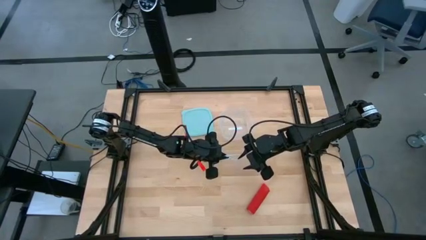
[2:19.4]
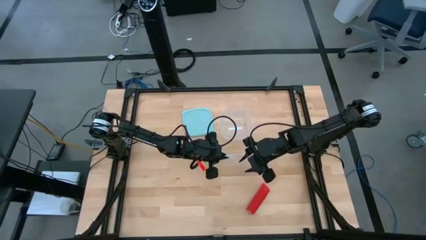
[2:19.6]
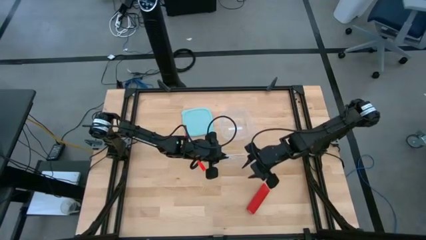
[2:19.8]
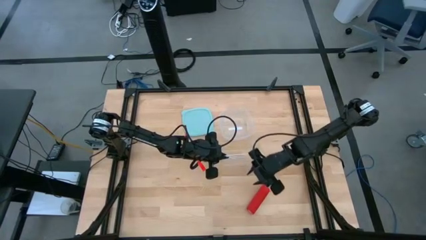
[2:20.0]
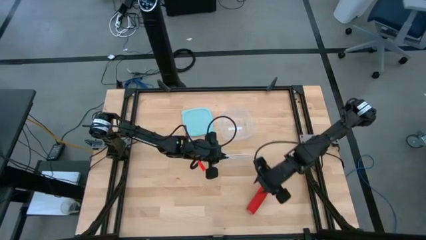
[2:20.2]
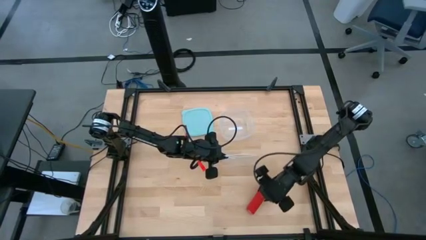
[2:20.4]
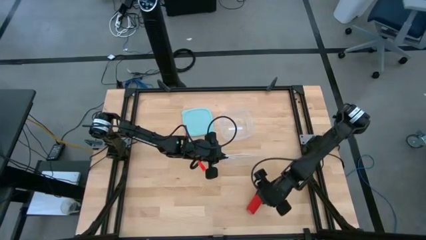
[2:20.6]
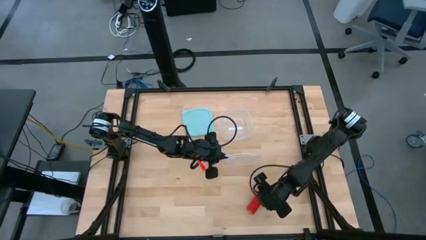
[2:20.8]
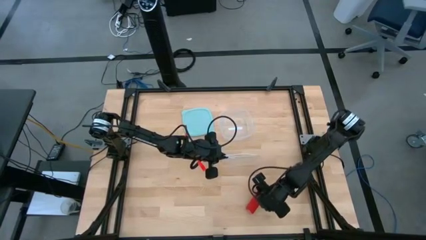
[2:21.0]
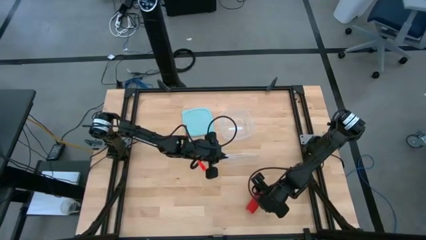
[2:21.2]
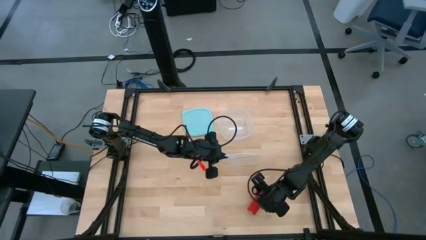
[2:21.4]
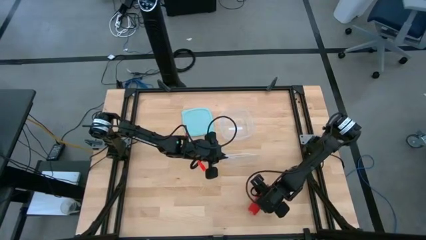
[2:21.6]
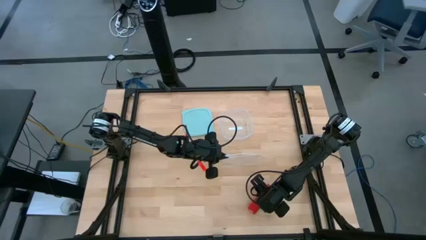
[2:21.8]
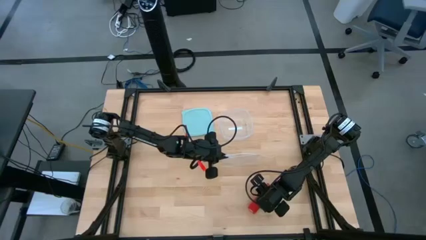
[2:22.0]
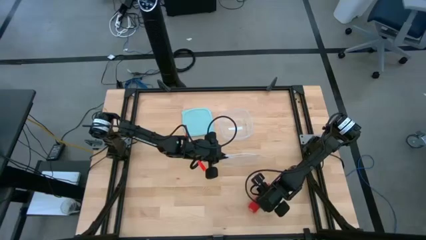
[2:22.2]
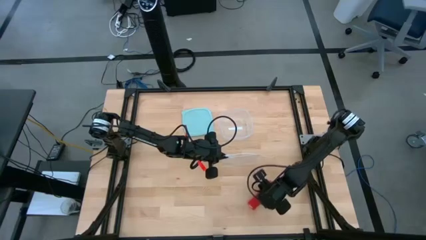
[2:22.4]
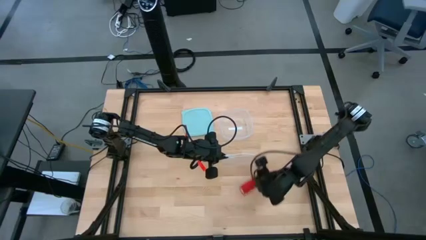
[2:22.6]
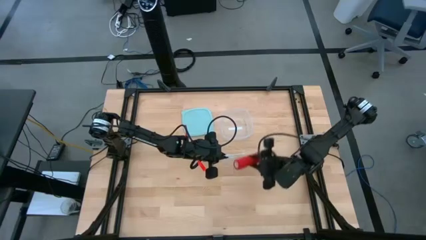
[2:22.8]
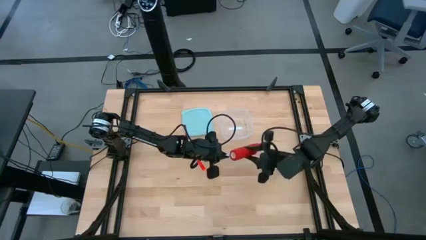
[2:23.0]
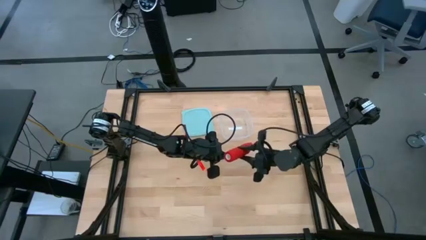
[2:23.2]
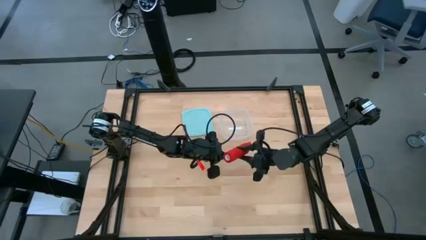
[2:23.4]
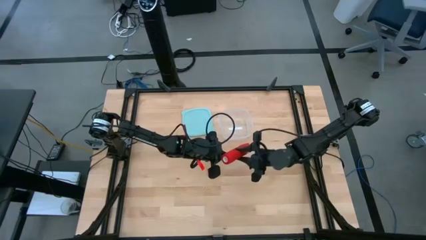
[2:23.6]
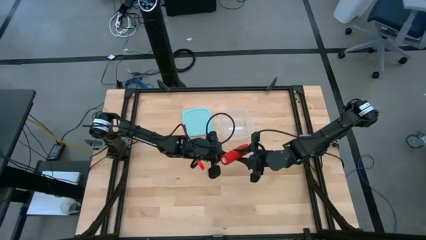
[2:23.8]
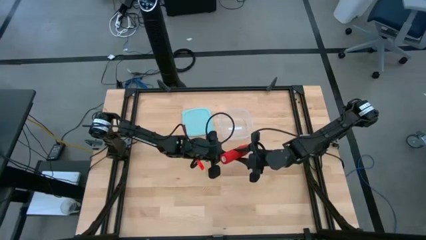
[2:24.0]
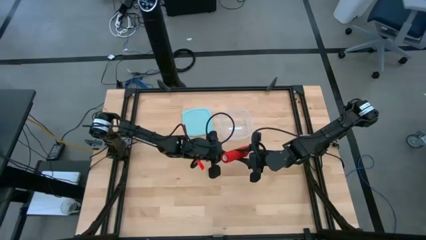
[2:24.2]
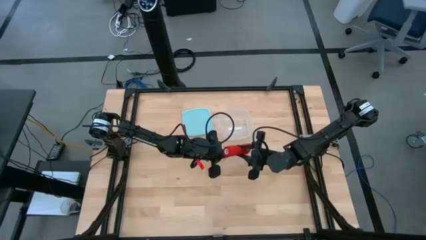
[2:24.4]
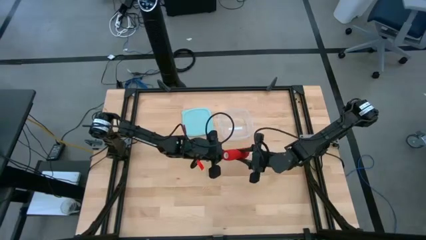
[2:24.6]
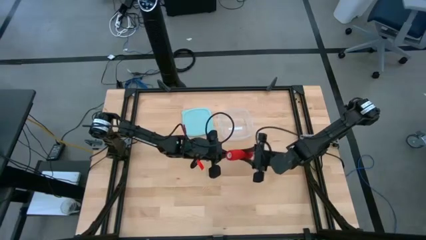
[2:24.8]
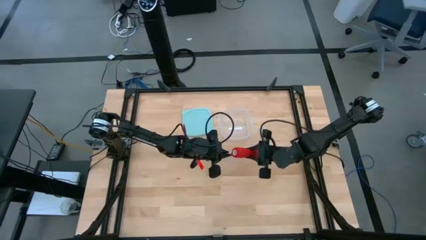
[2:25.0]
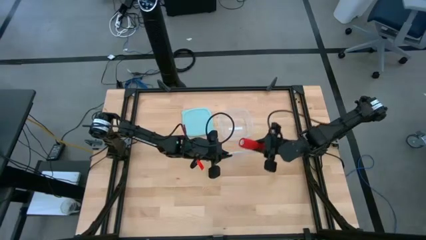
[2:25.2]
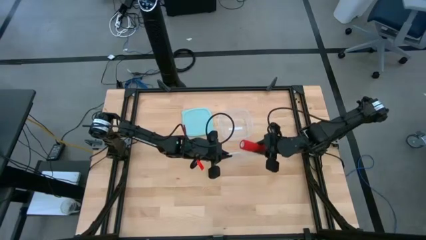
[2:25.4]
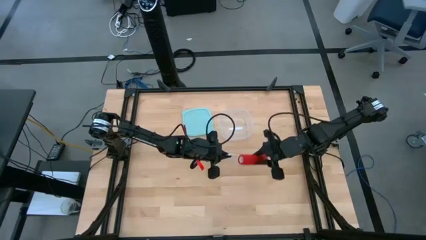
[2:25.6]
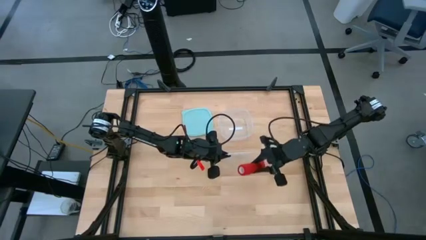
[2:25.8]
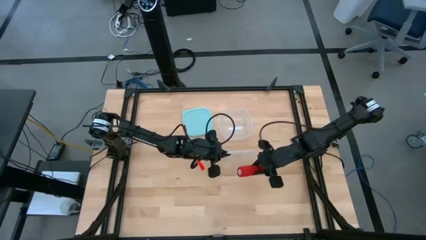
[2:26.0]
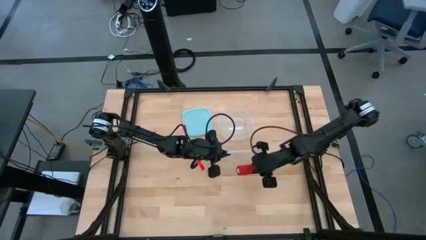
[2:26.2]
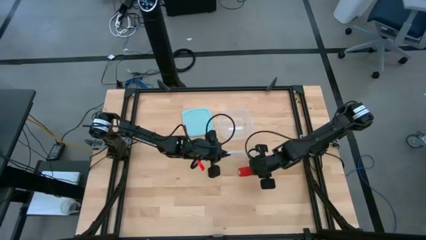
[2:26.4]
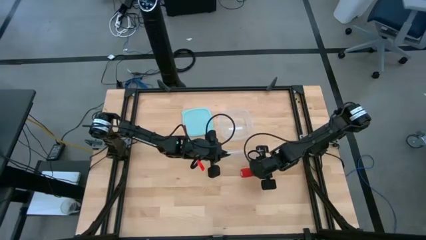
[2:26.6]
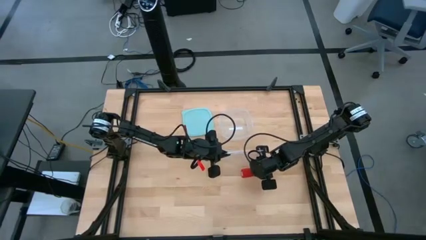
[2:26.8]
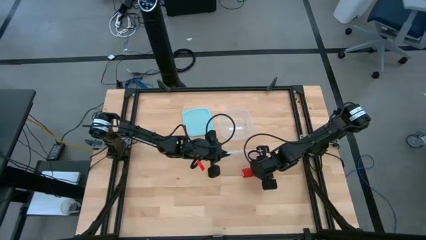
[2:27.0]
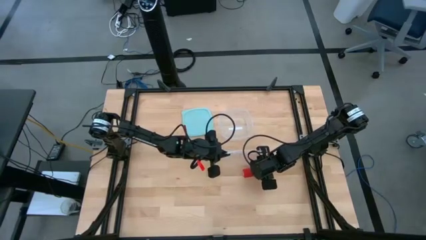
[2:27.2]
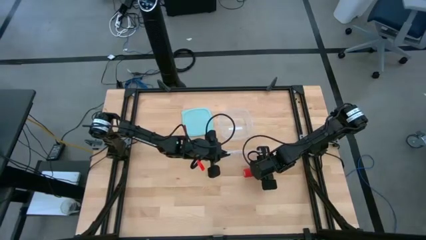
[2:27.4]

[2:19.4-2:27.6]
Task: Roll bandage
Put the red rolled bandage into the transparent zip lock bag

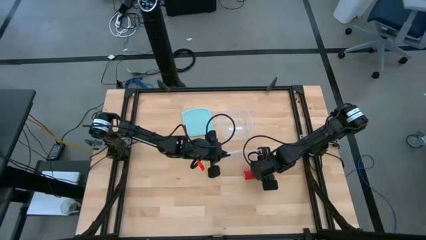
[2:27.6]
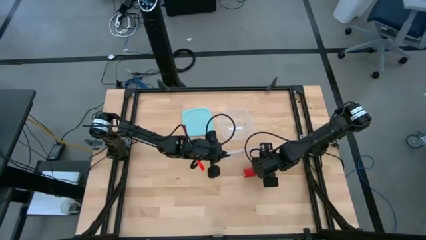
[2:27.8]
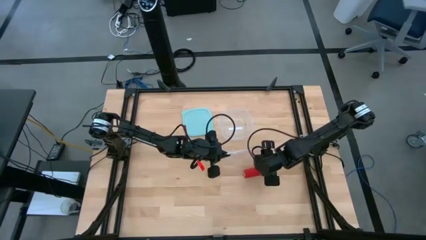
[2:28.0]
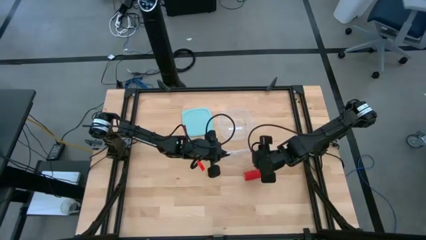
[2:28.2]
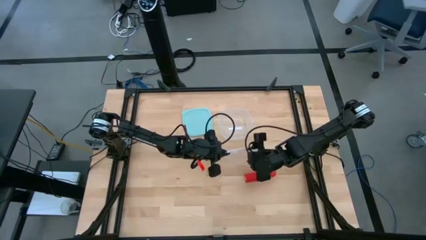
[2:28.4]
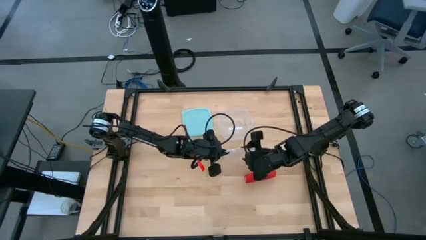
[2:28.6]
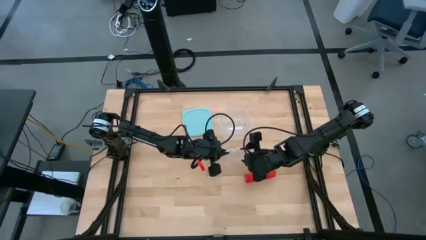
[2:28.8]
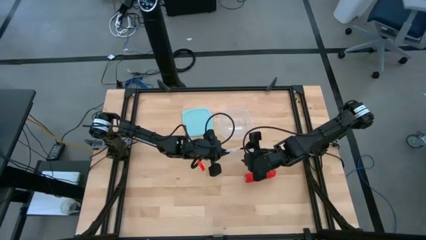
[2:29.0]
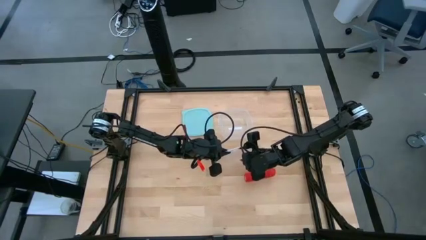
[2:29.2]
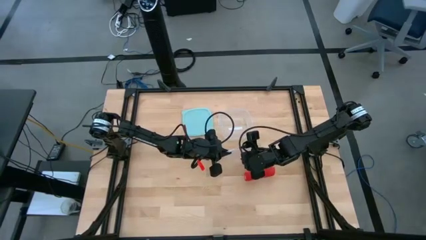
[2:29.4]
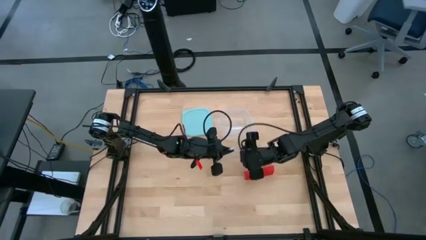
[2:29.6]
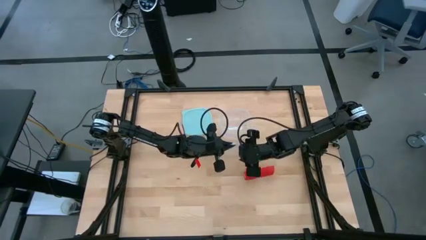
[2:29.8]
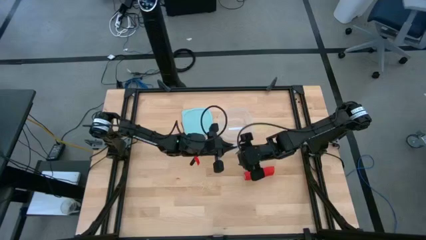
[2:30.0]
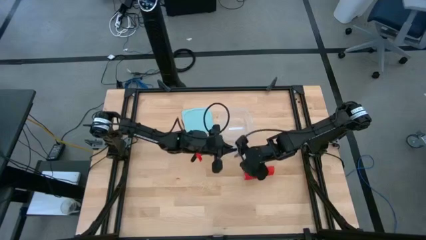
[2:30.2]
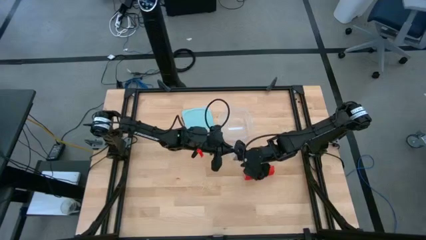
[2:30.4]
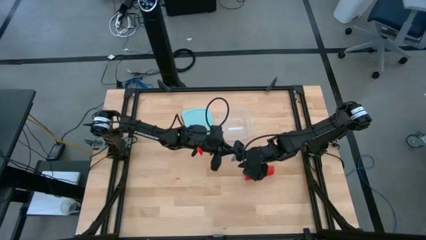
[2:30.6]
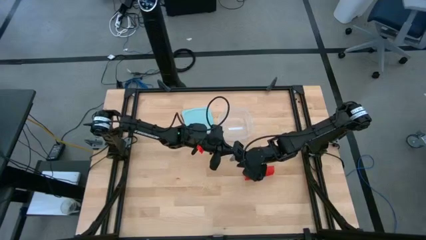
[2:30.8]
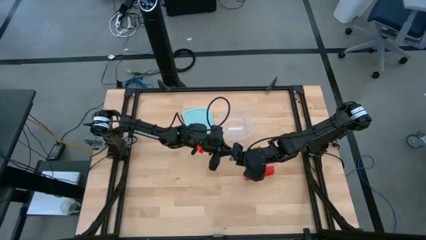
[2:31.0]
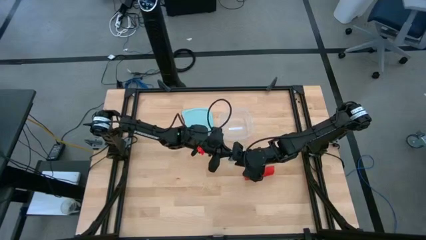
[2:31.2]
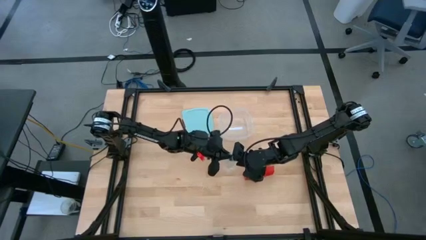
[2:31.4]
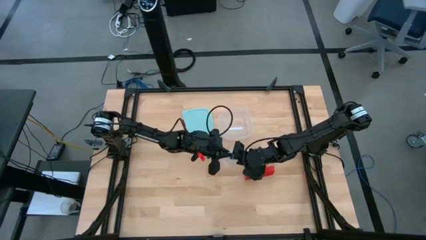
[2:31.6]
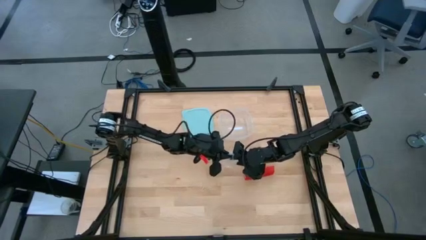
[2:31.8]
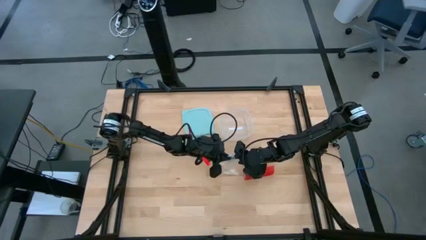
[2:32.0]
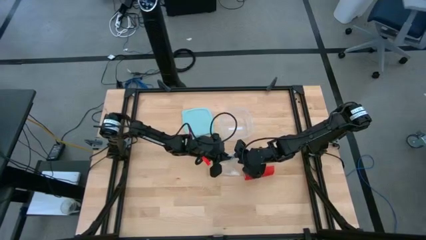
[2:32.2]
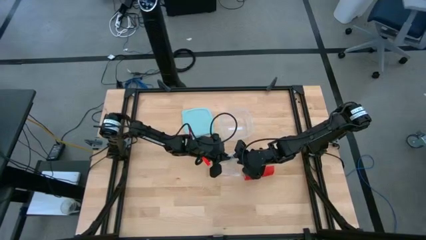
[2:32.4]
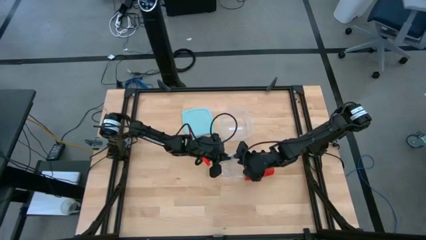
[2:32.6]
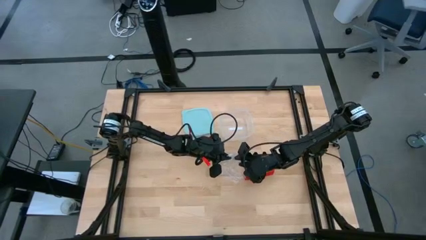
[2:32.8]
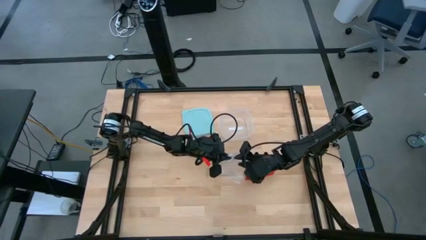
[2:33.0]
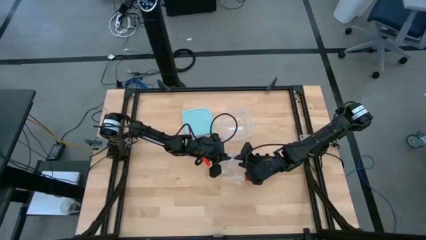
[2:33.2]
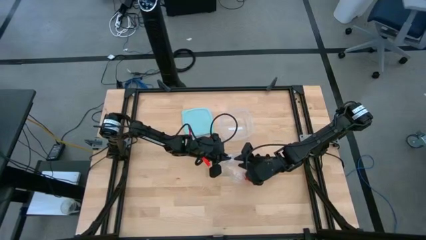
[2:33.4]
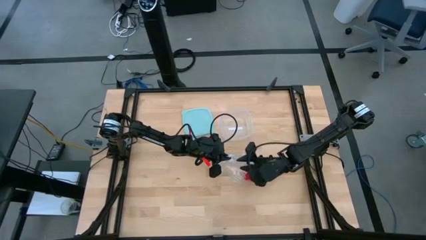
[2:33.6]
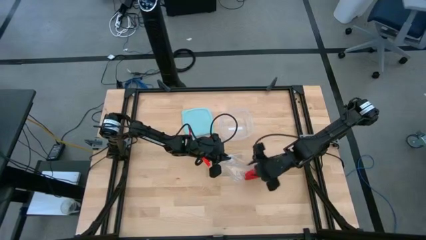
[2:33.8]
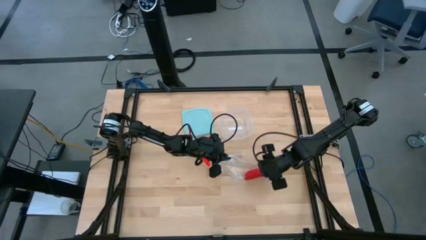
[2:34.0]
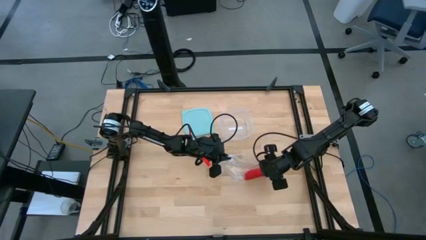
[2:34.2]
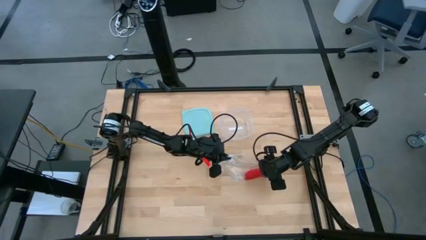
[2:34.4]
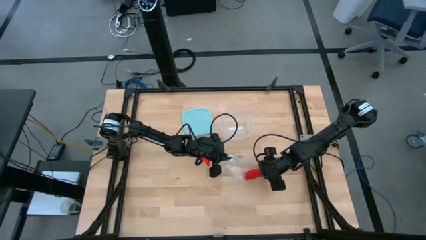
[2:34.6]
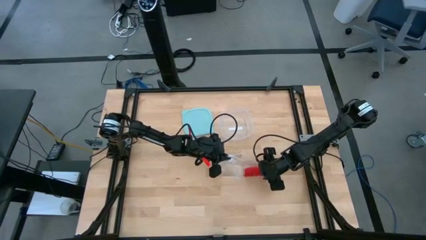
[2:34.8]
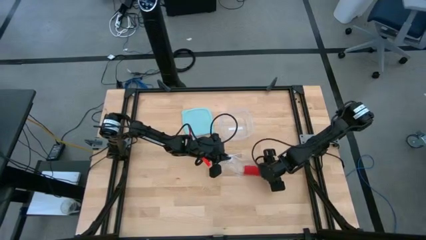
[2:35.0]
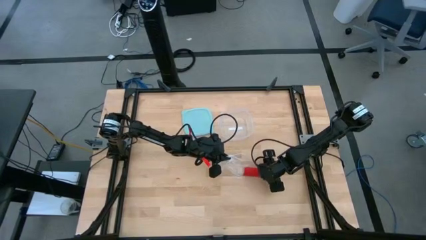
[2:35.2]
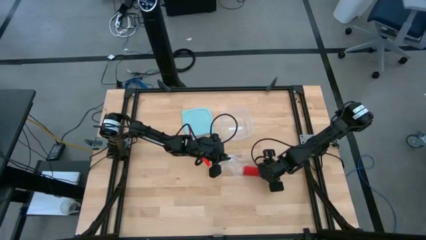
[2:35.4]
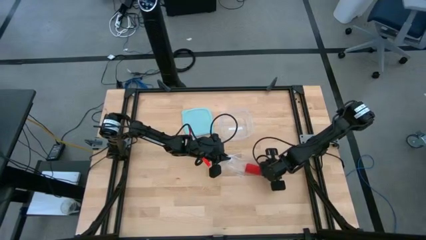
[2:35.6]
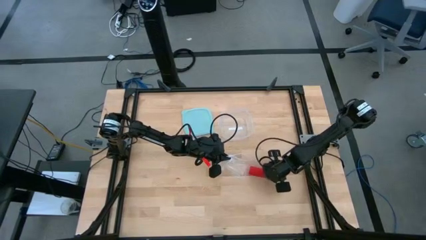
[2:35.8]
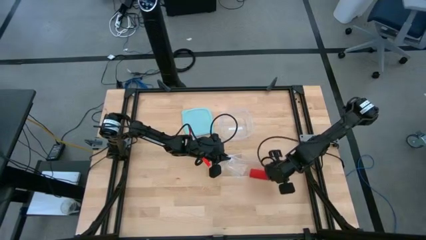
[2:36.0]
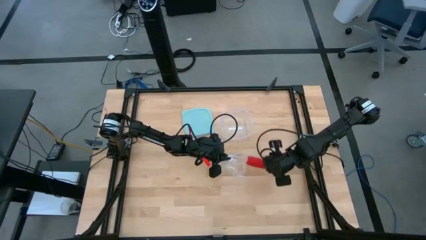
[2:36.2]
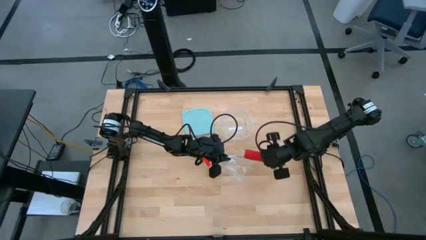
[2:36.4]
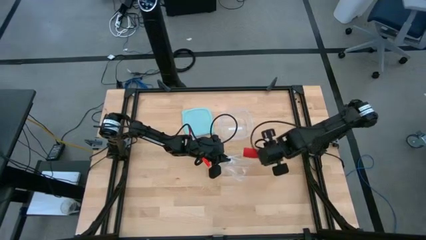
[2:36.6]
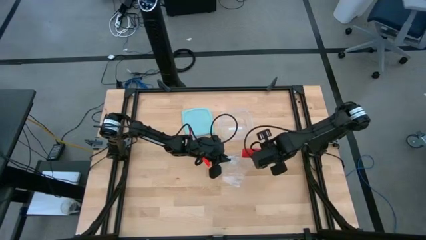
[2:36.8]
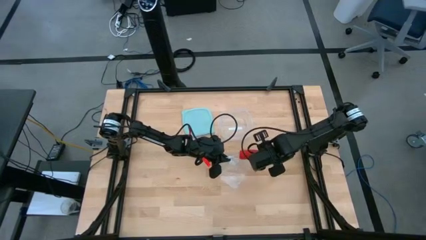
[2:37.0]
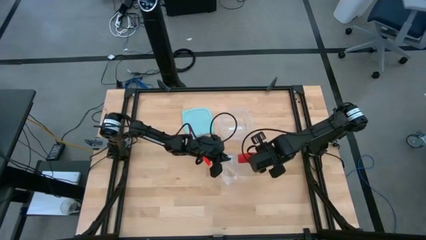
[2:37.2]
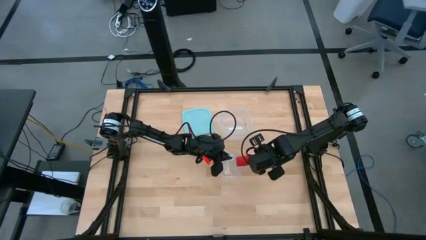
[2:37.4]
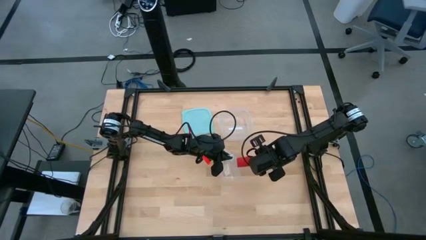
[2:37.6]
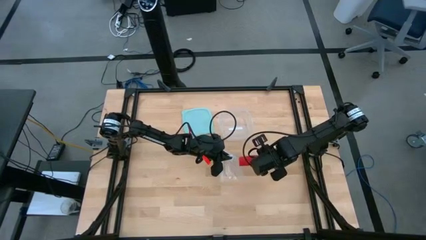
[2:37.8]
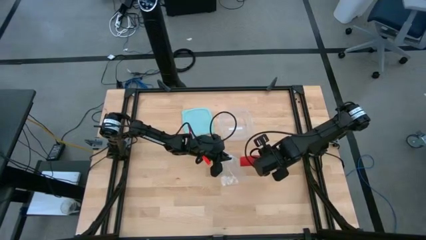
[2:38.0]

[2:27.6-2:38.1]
Put the red rolled bandage into the transparent zip lock bag
